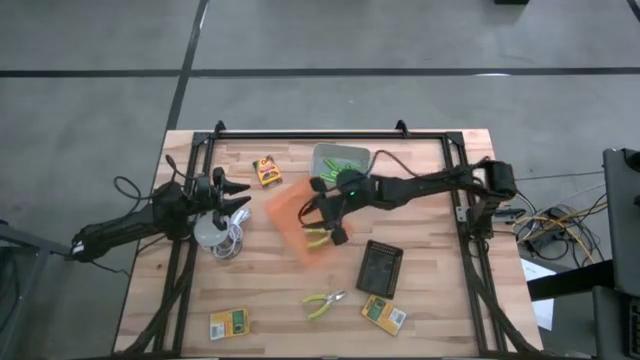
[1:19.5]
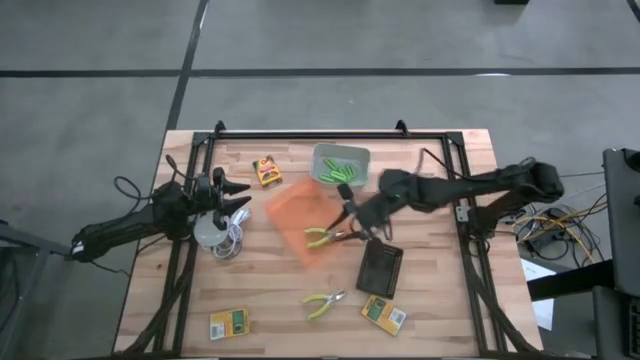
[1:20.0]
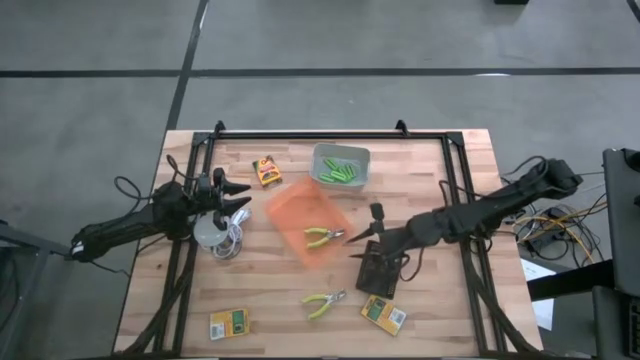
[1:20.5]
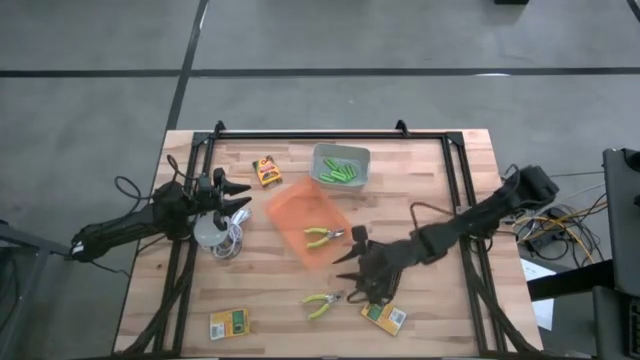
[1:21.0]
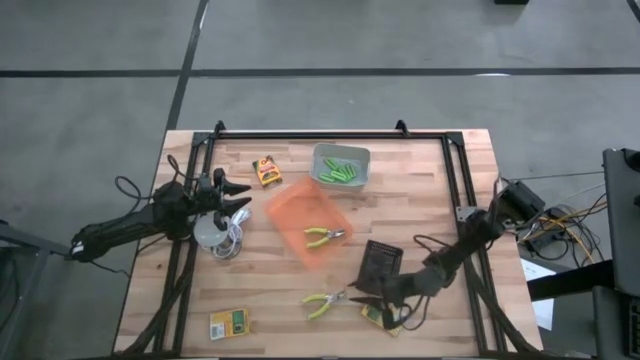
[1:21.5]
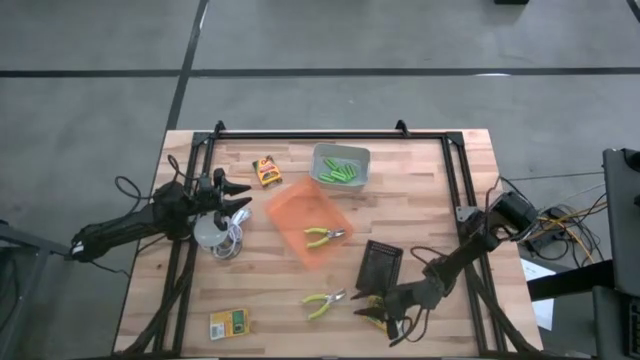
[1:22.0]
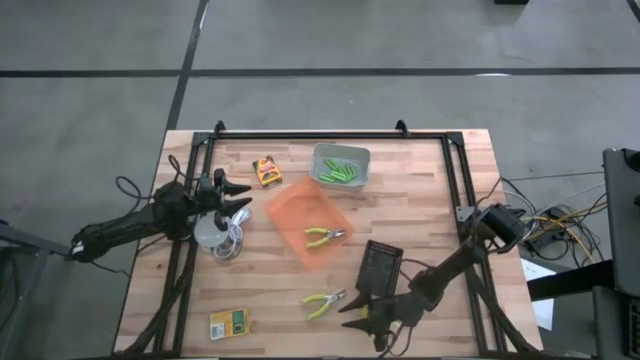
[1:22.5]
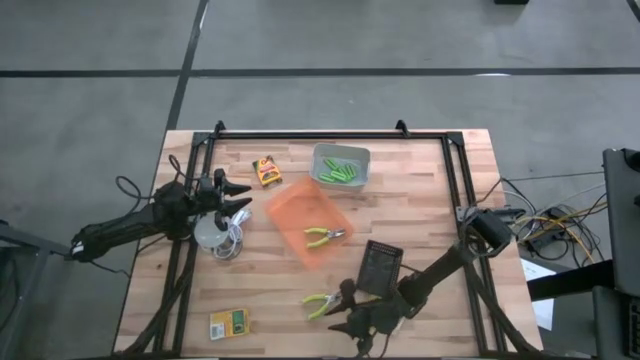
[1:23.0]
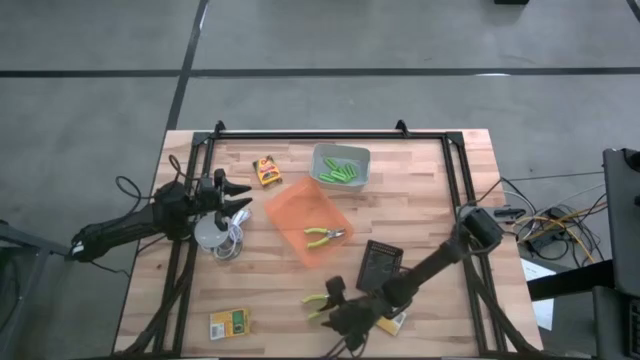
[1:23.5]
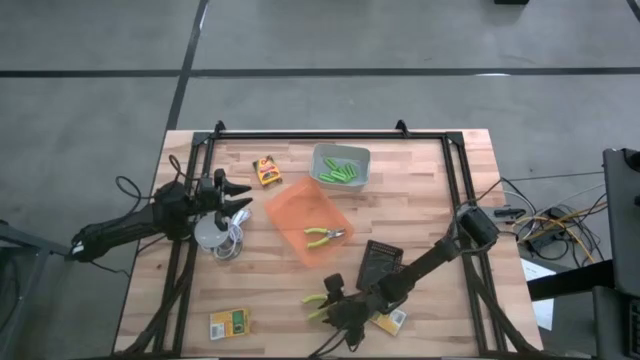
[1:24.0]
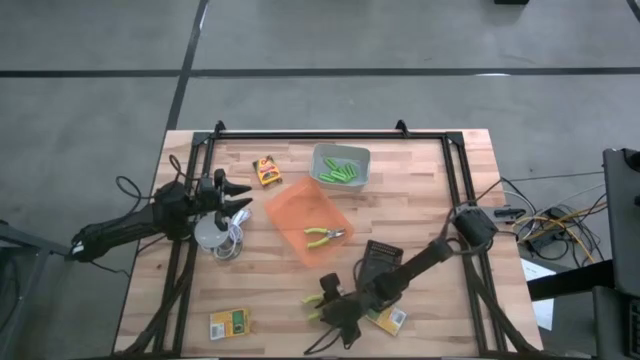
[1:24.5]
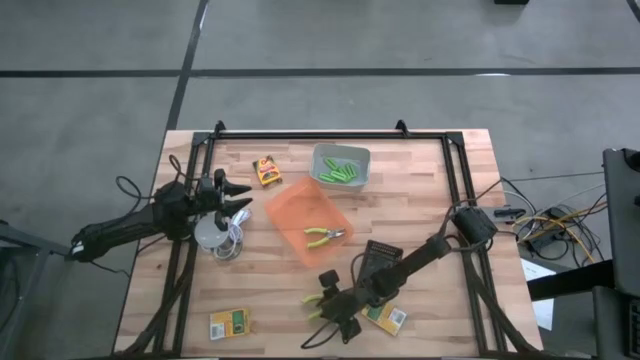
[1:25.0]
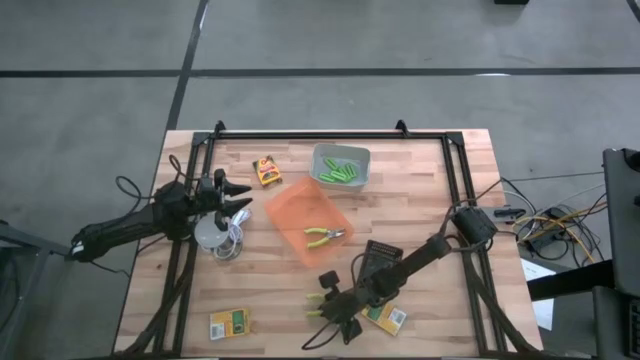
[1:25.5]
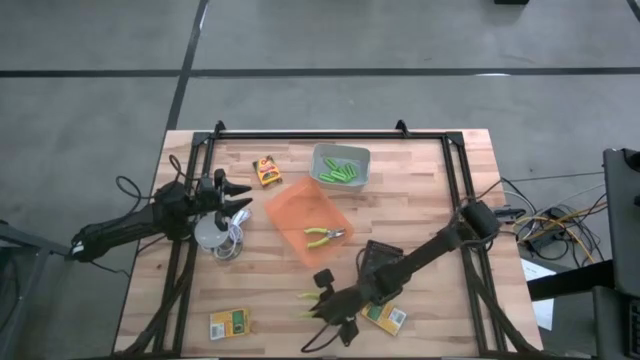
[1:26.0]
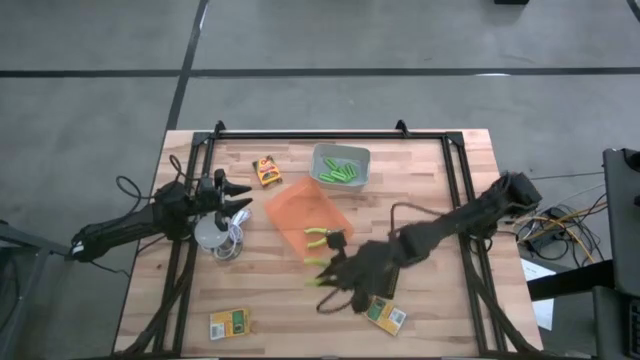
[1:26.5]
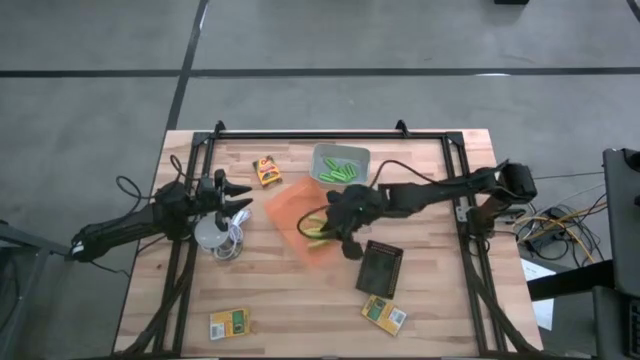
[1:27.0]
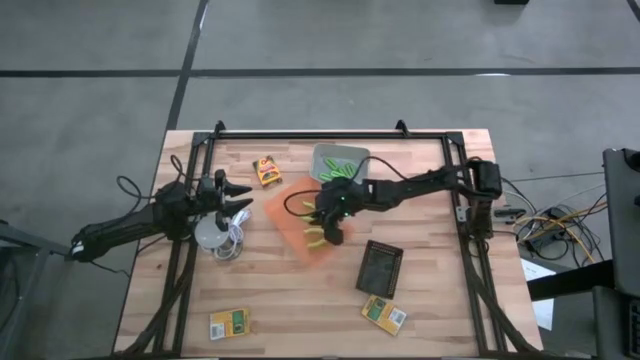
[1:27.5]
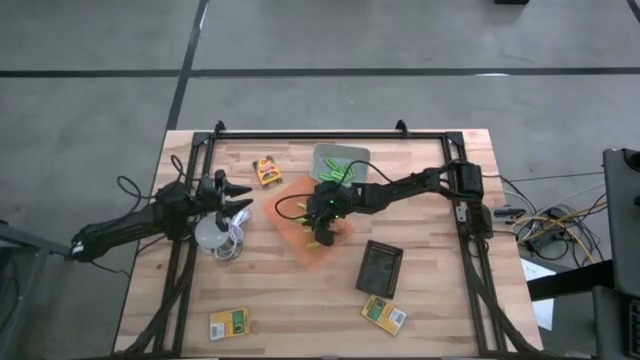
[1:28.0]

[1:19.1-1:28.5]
Task: Pick & Place School Supplies
Put the green hole puncher into the orange bin

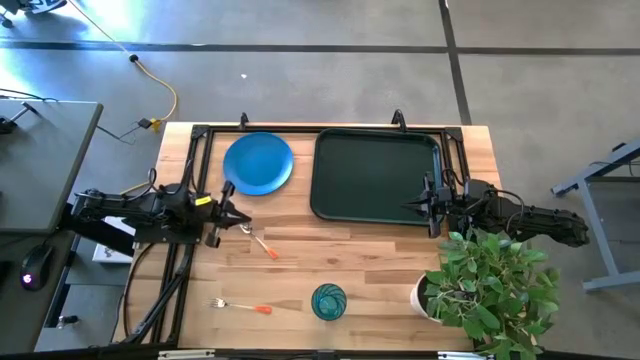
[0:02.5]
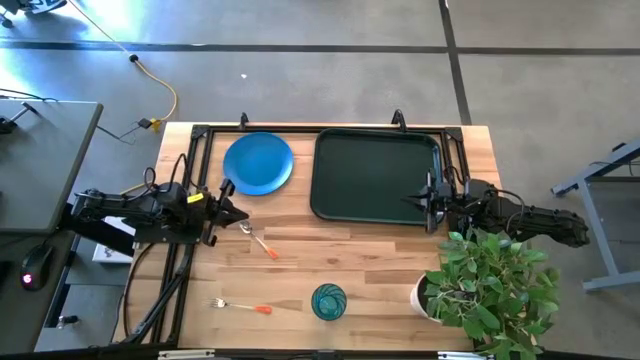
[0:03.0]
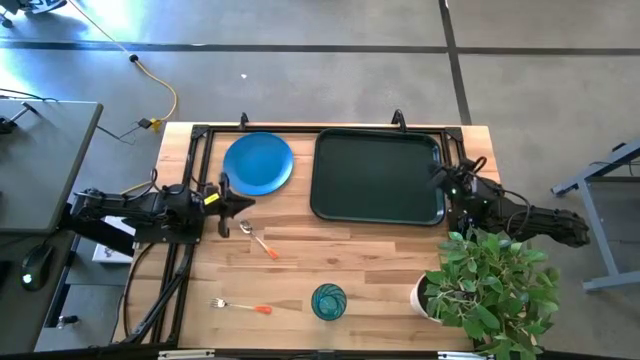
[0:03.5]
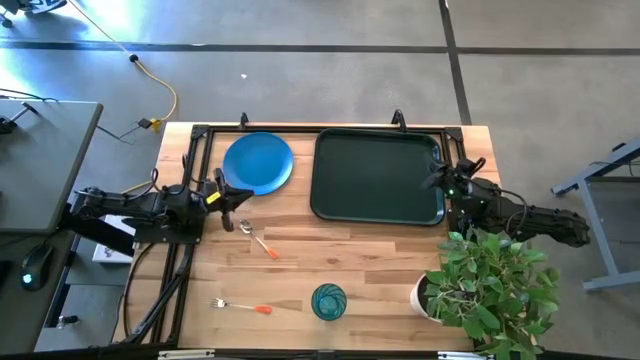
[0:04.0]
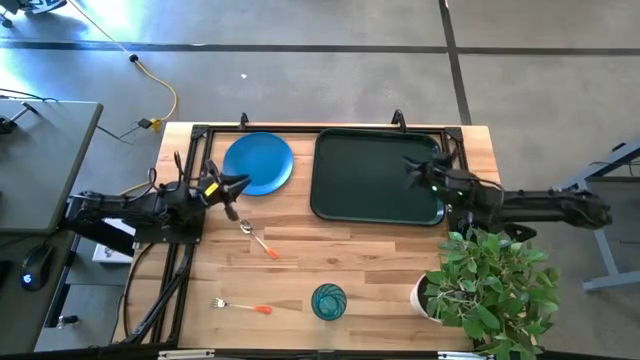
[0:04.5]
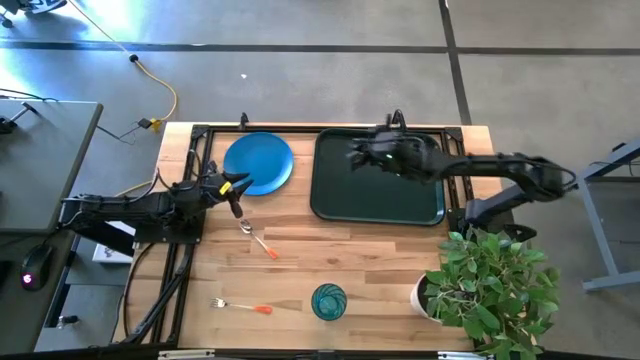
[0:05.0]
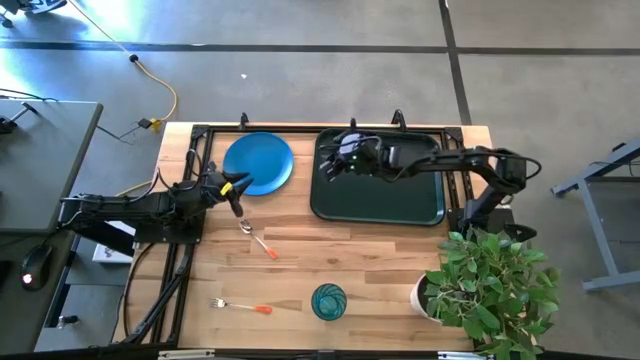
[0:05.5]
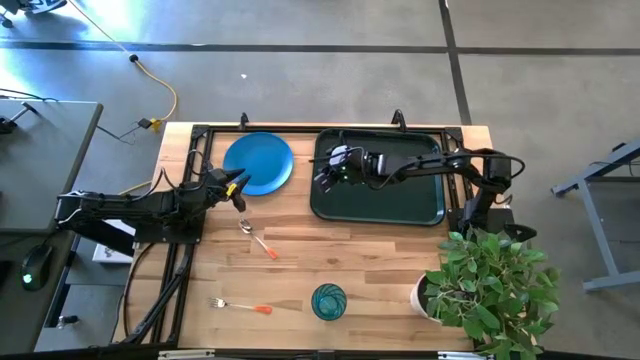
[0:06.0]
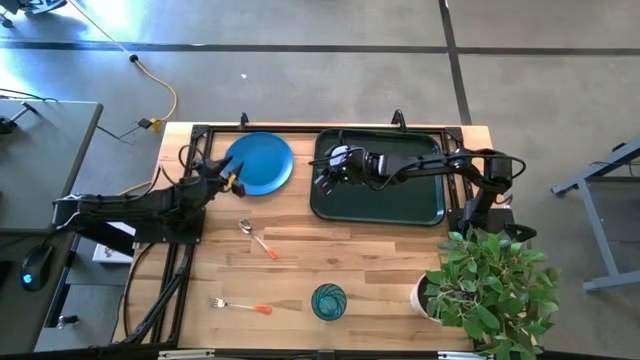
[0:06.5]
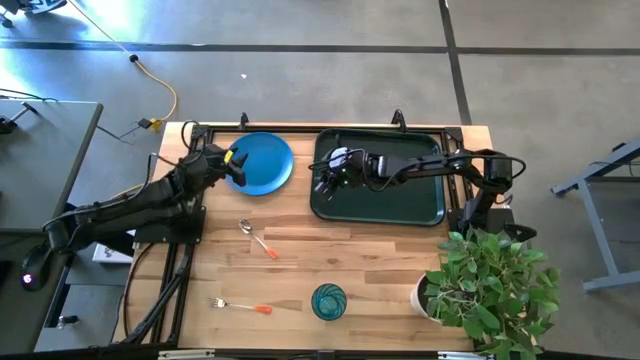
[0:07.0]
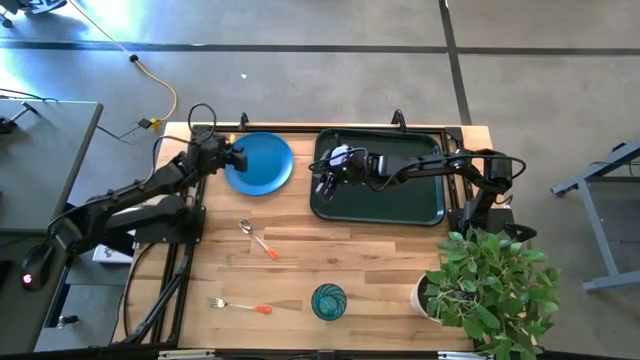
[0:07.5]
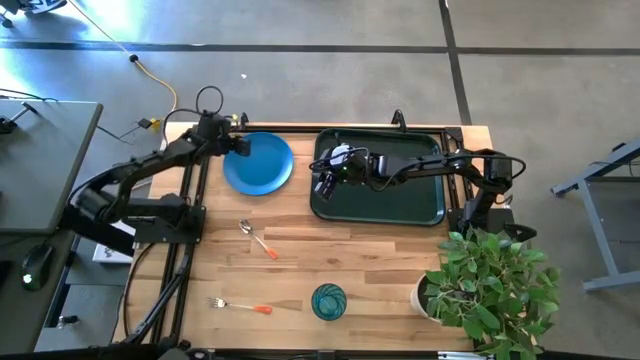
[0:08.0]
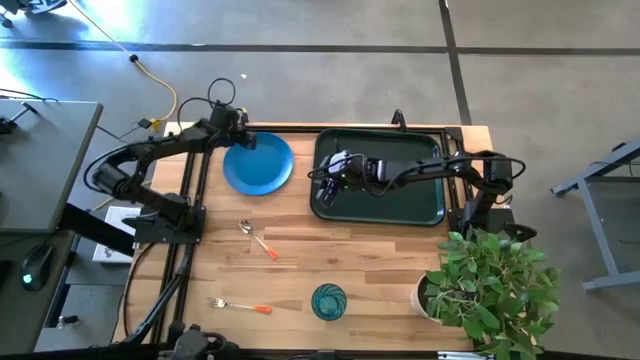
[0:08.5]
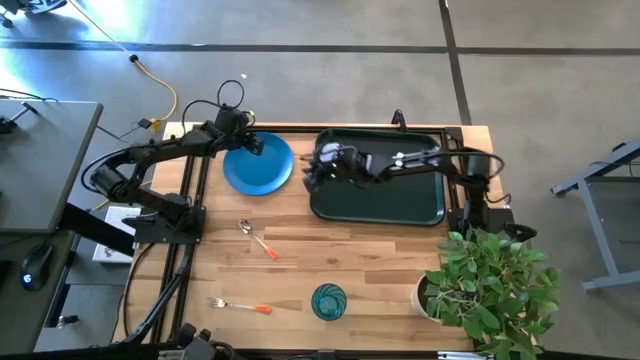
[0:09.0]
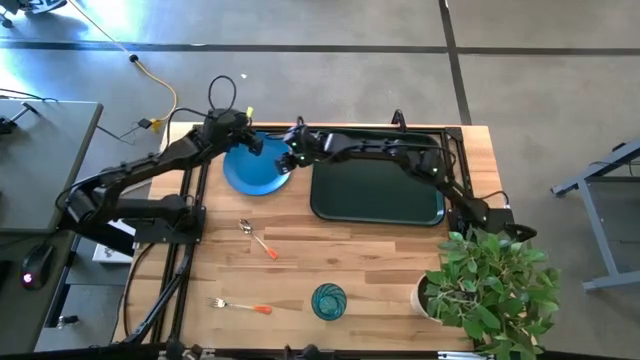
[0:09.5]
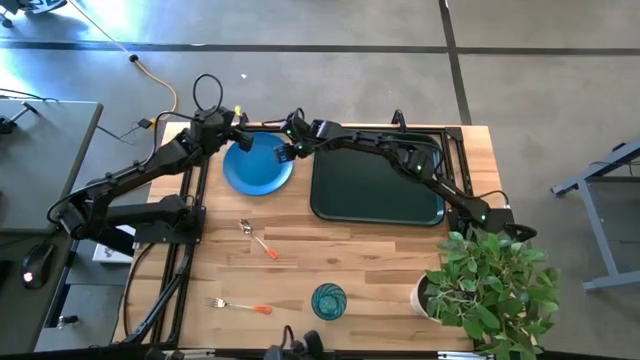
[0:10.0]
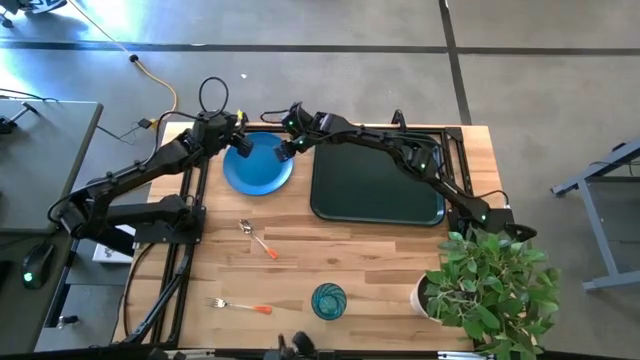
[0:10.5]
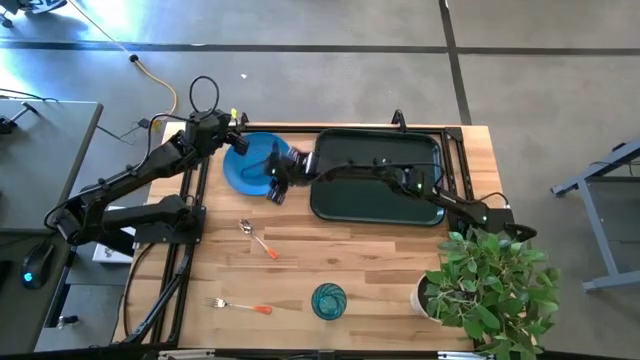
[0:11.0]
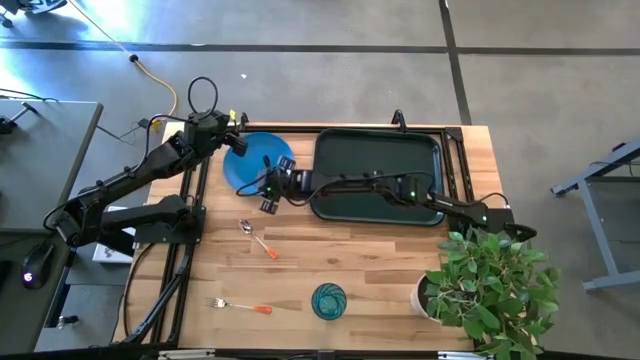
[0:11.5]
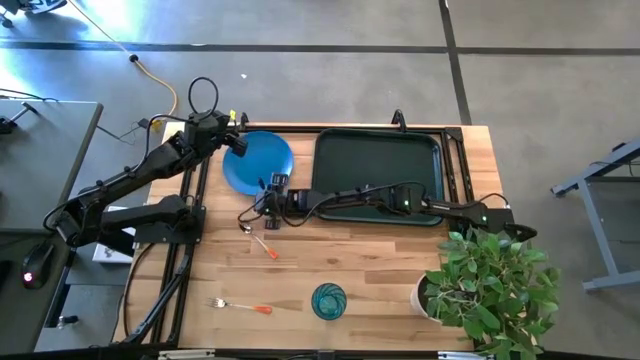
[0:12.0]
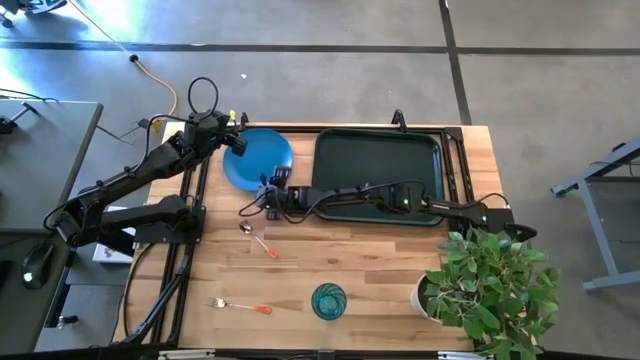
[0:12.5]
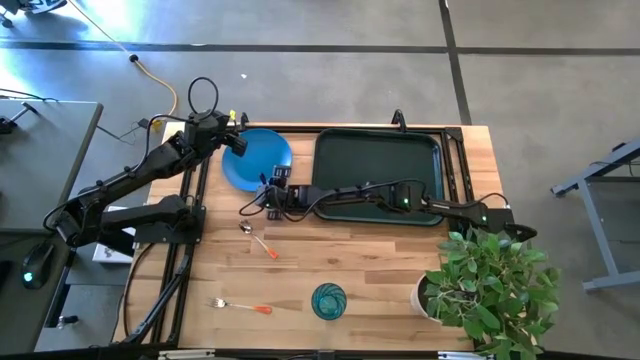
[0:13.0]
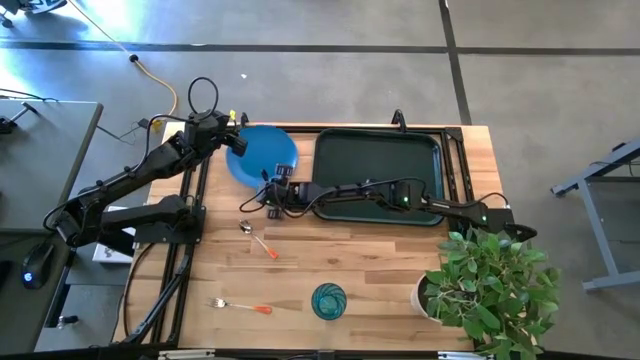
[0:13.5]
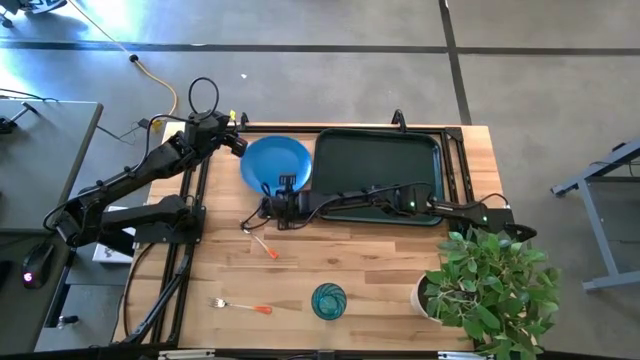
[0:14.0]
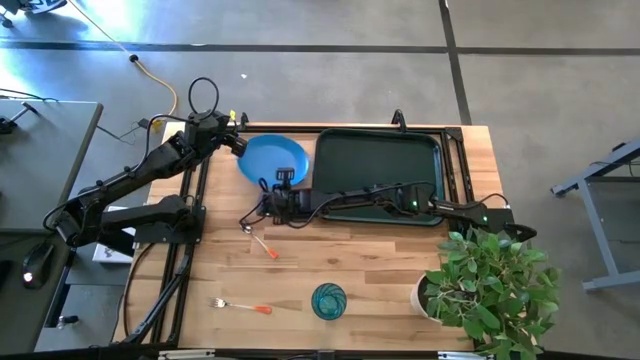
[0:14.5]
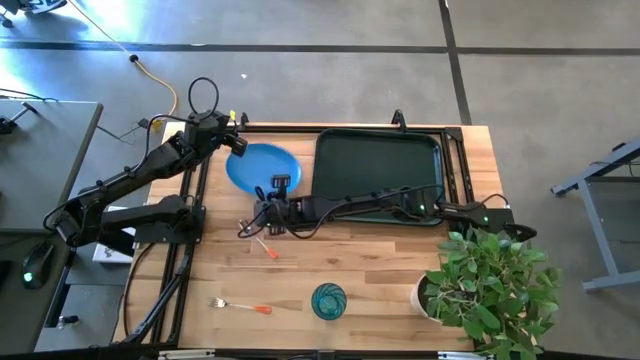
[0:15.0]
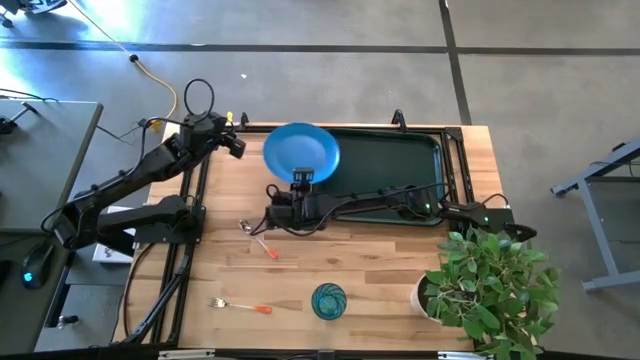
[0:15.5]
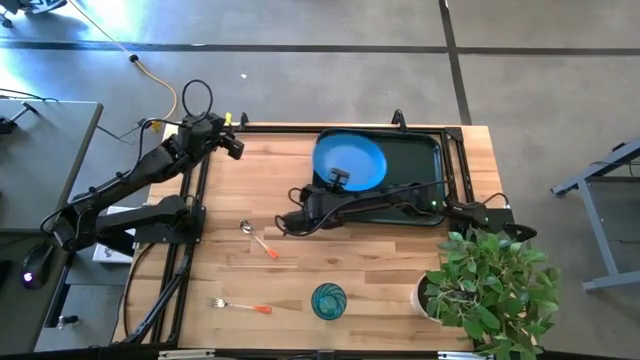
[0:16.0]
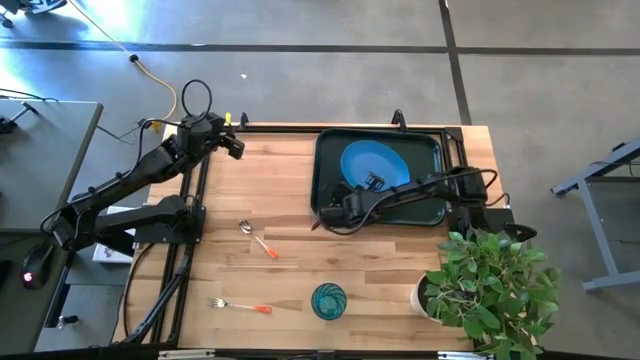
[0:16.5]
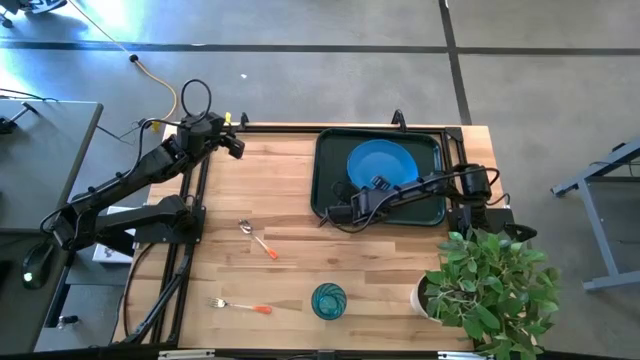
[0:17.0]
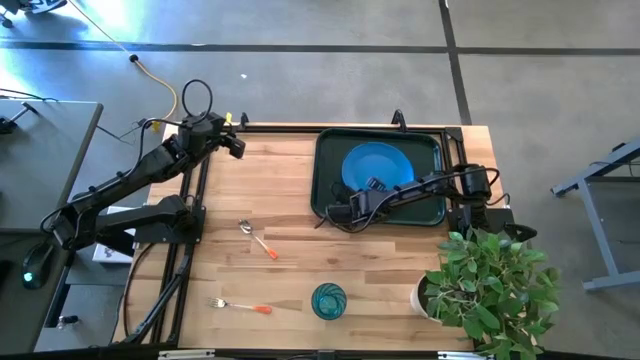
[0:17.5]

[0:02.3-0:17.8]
Task: Pick and place plate/cup/fork/spoon on tray
Put the blue plate on the centre of the green serving tray
